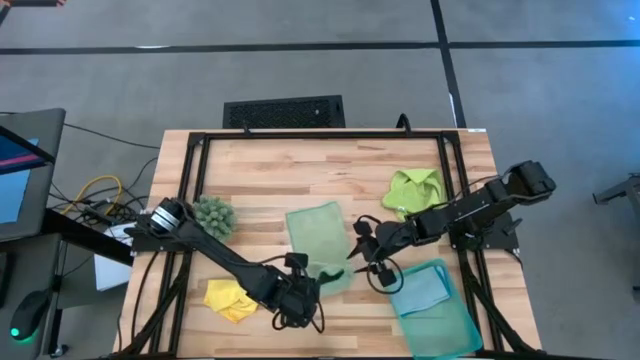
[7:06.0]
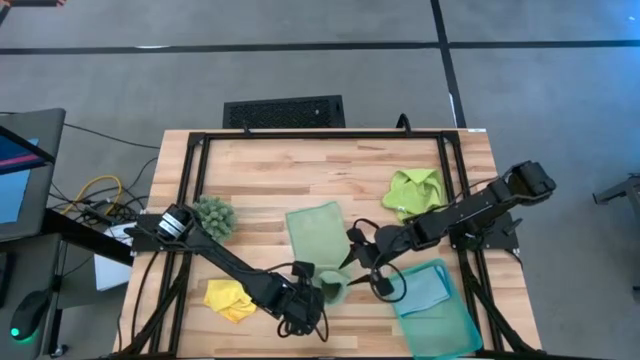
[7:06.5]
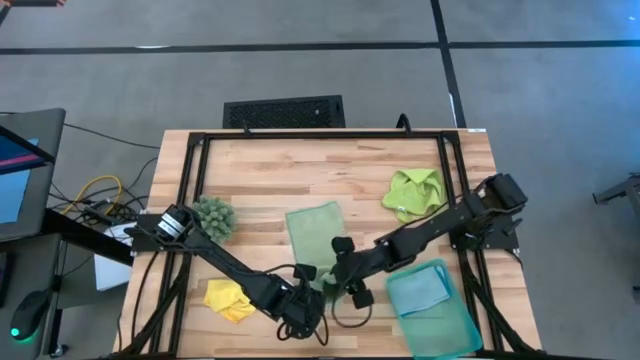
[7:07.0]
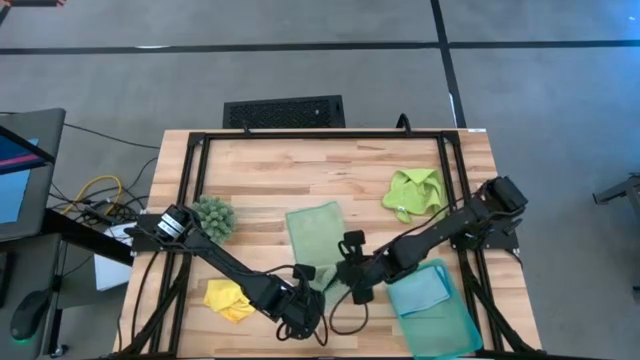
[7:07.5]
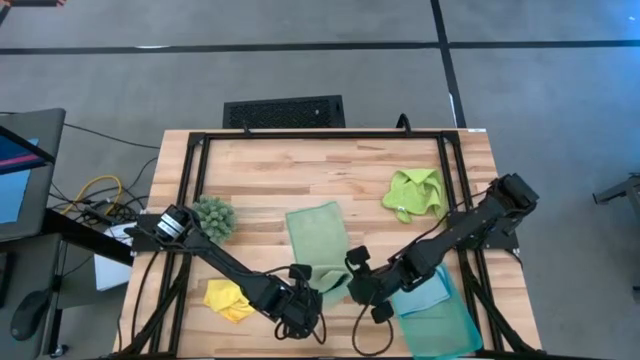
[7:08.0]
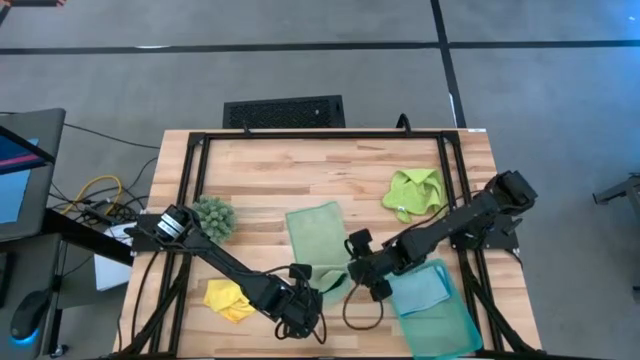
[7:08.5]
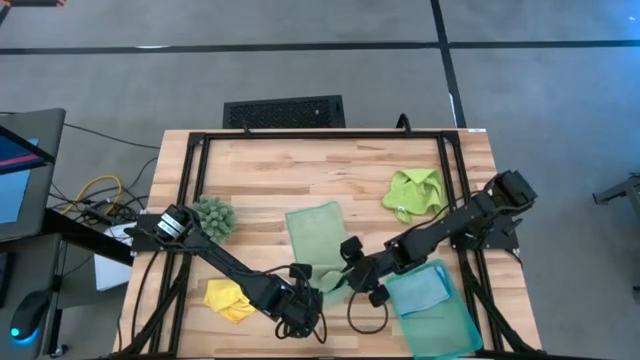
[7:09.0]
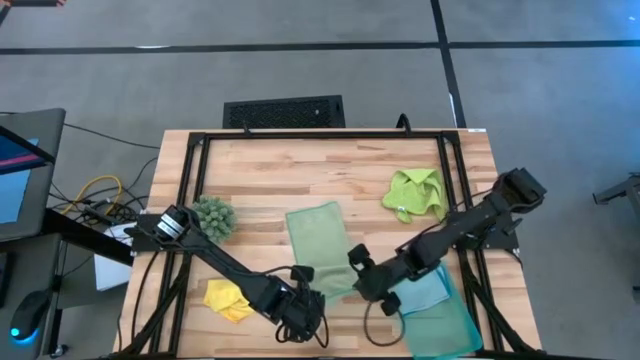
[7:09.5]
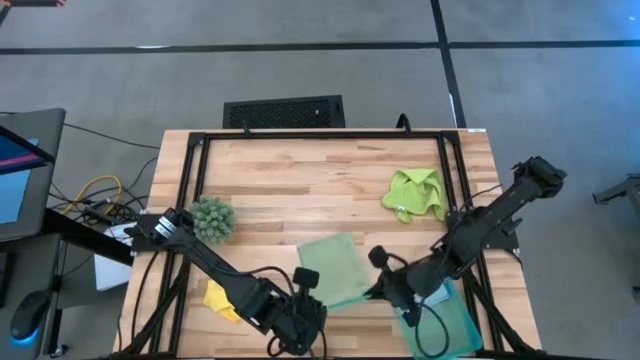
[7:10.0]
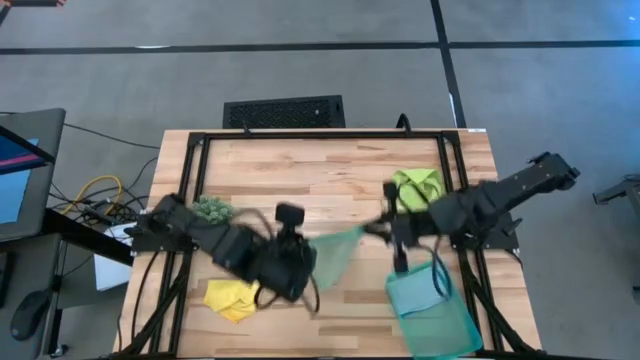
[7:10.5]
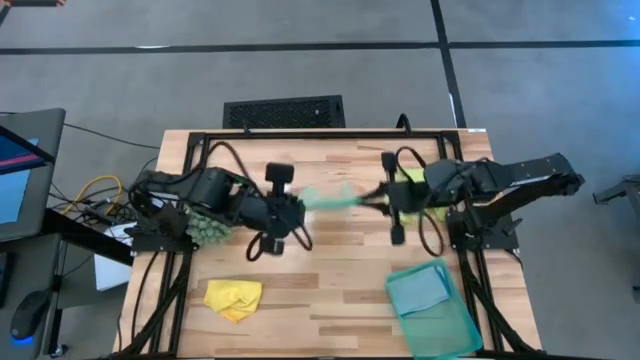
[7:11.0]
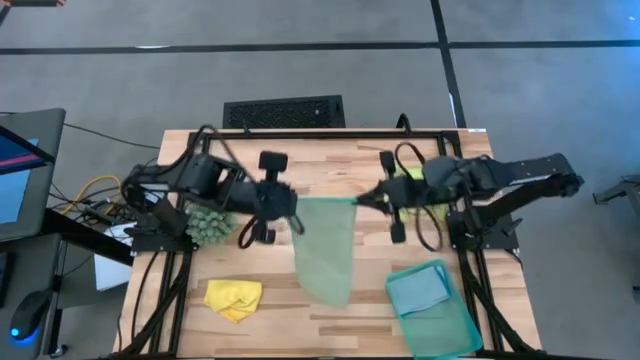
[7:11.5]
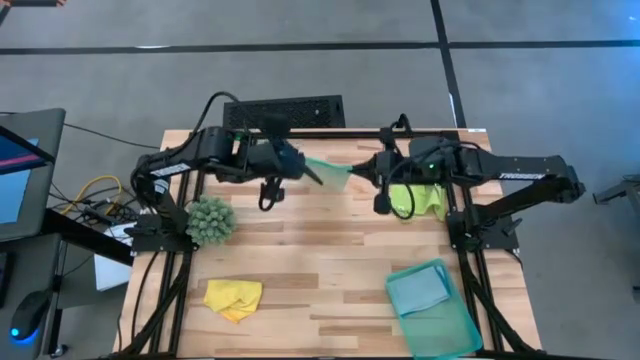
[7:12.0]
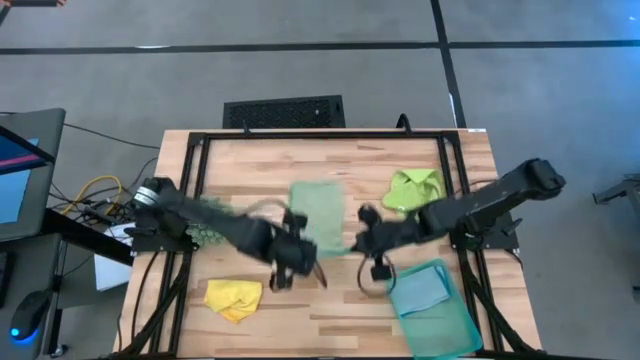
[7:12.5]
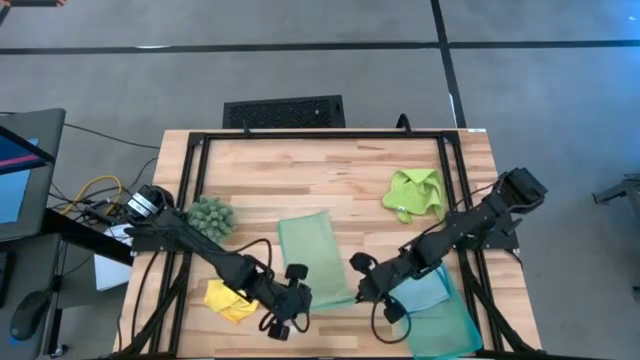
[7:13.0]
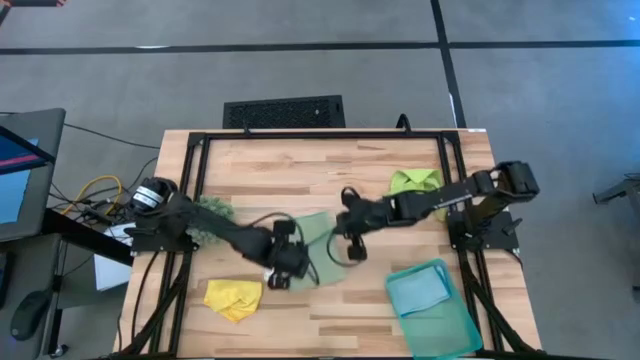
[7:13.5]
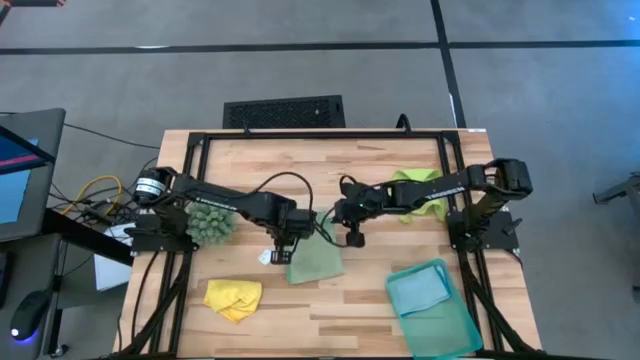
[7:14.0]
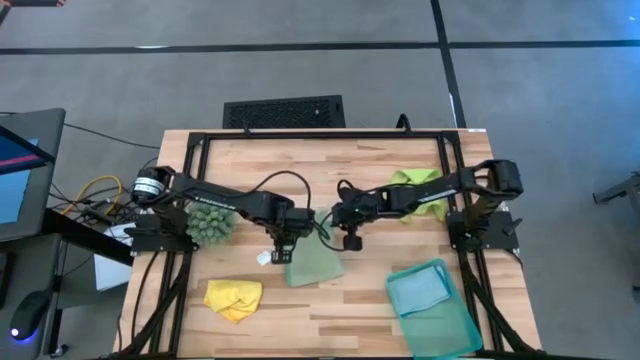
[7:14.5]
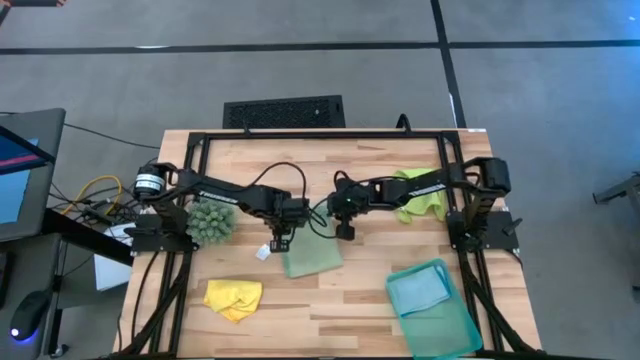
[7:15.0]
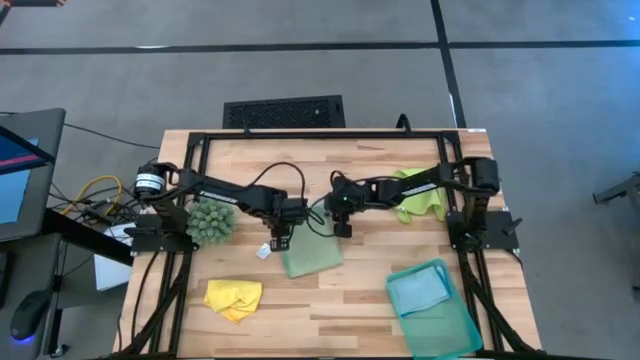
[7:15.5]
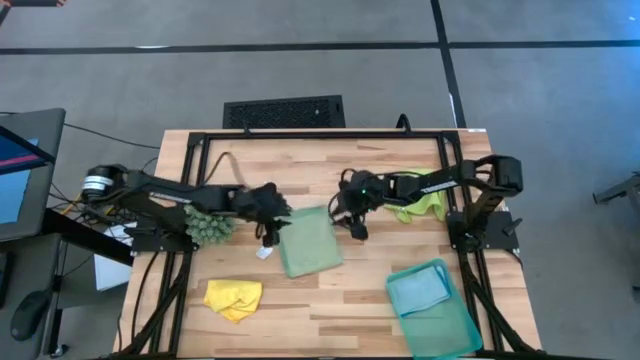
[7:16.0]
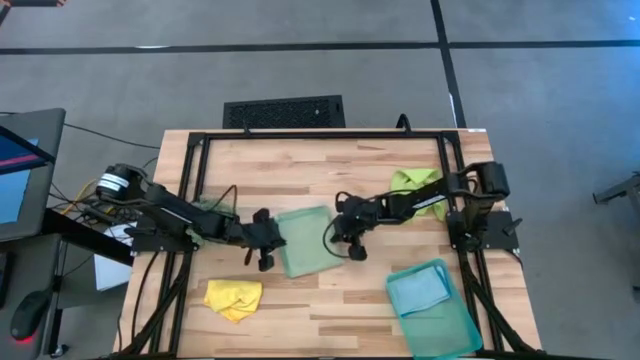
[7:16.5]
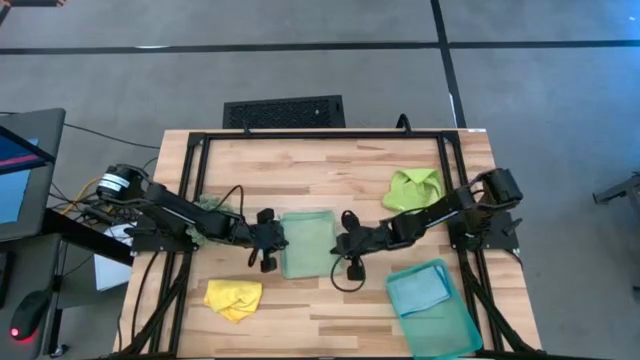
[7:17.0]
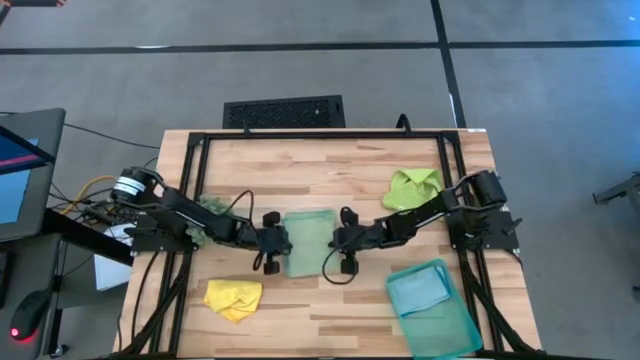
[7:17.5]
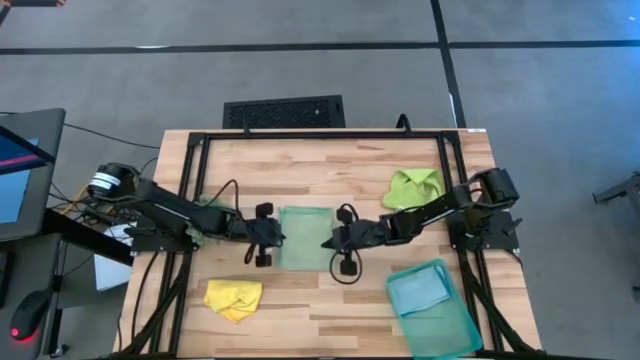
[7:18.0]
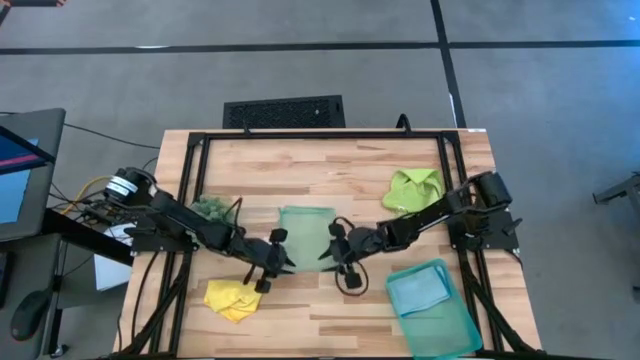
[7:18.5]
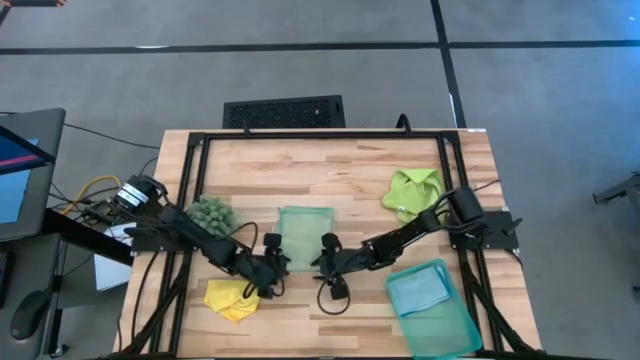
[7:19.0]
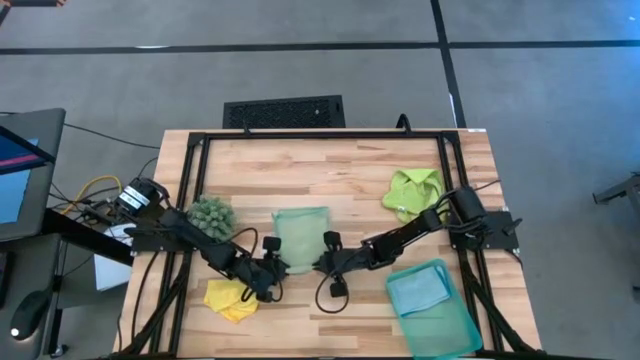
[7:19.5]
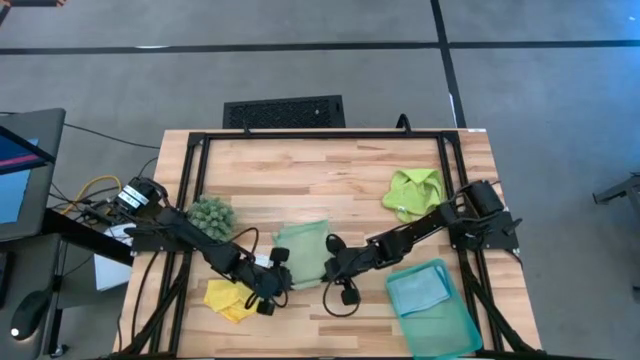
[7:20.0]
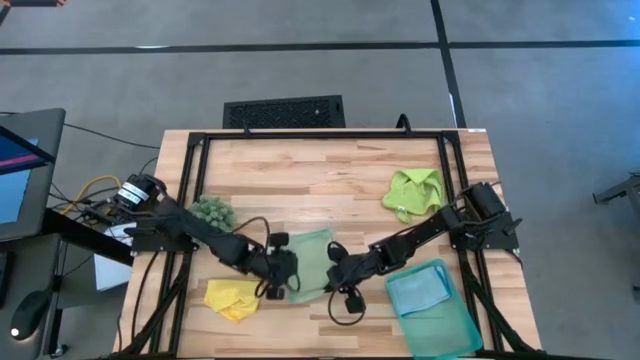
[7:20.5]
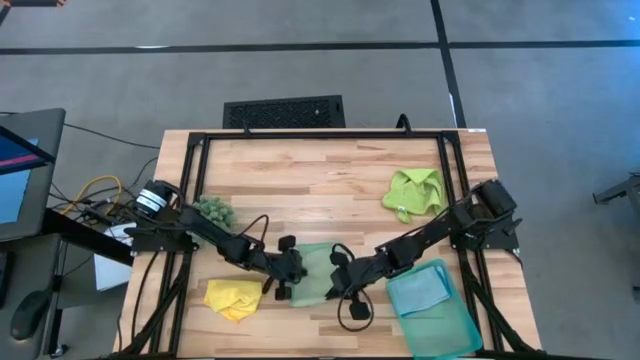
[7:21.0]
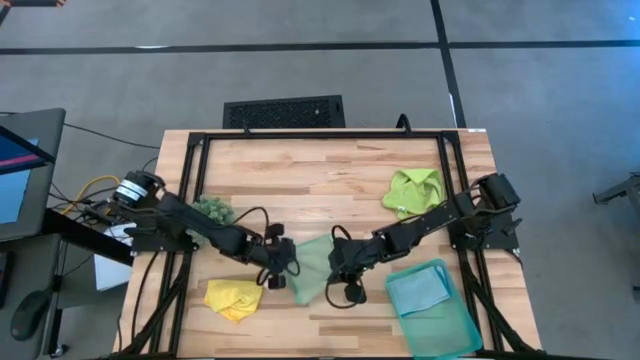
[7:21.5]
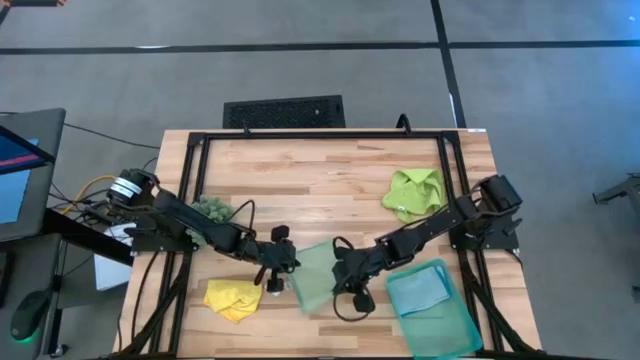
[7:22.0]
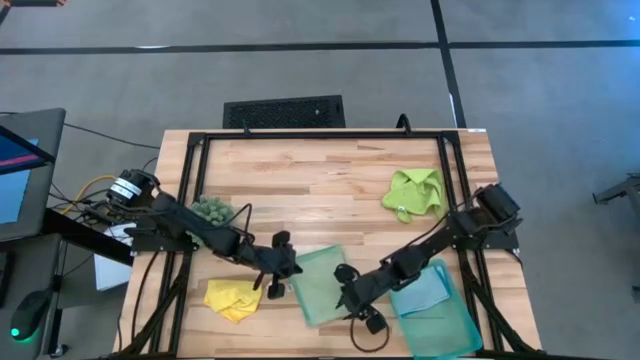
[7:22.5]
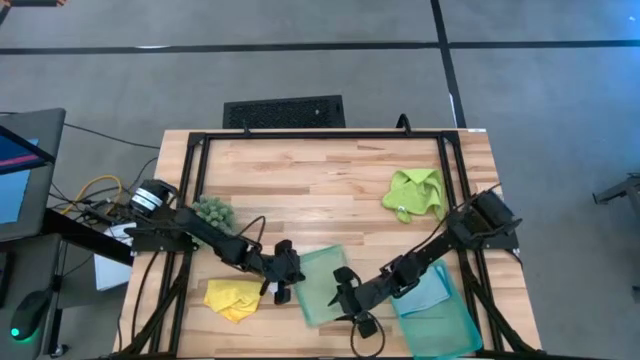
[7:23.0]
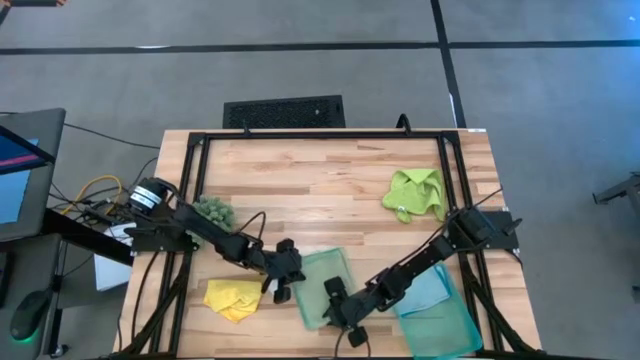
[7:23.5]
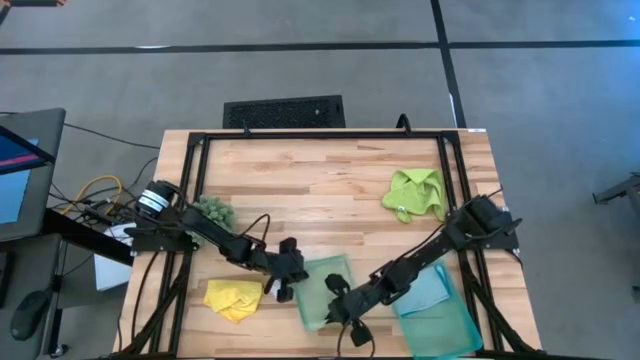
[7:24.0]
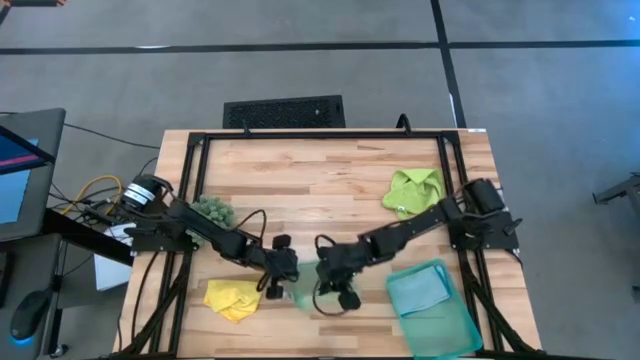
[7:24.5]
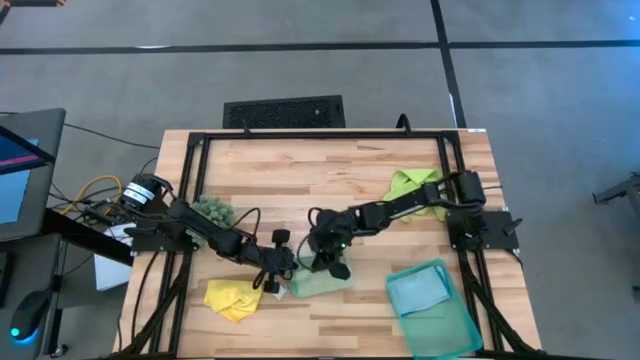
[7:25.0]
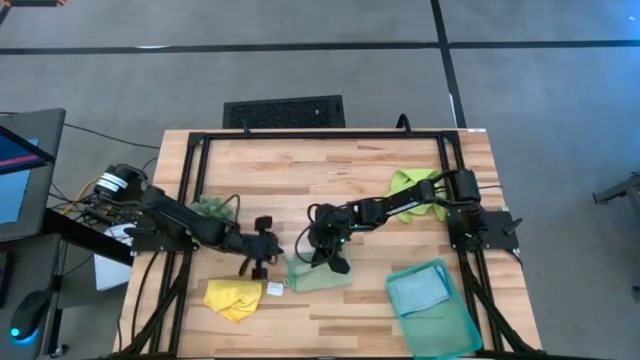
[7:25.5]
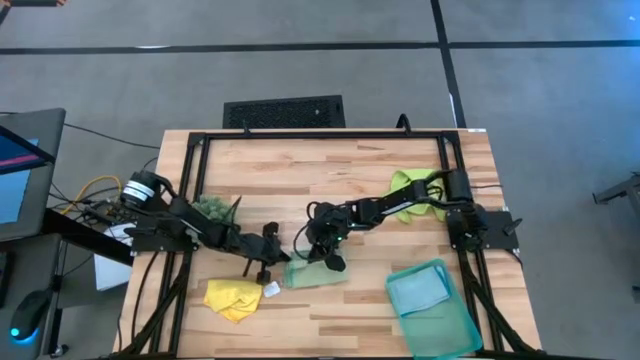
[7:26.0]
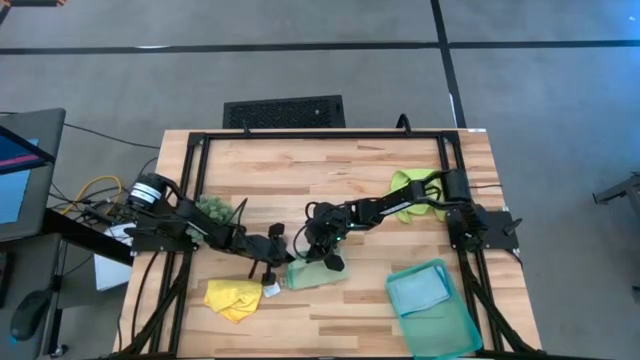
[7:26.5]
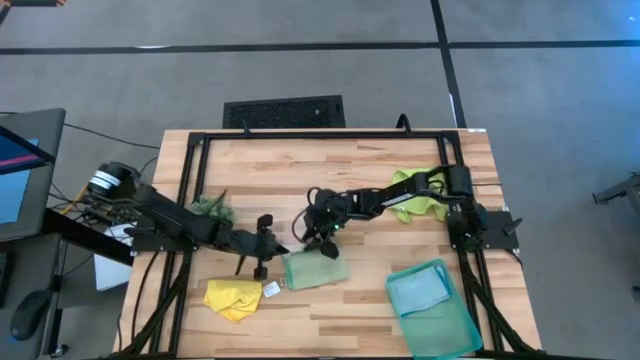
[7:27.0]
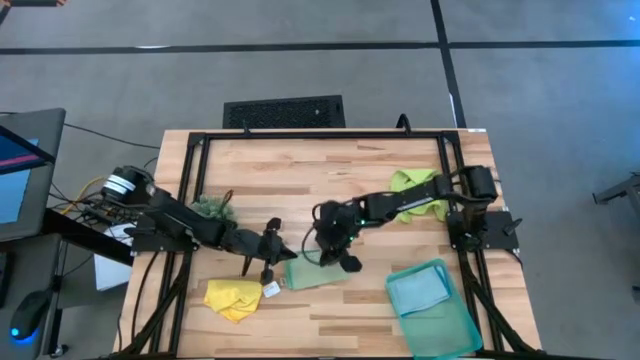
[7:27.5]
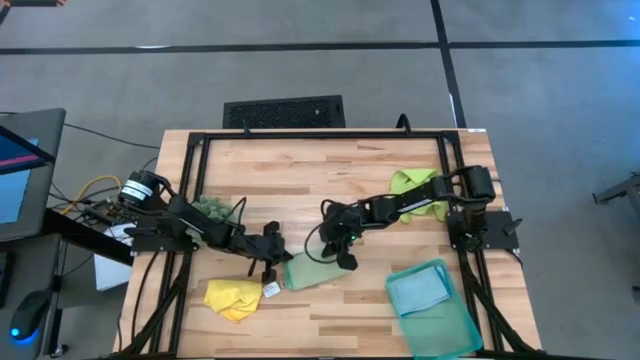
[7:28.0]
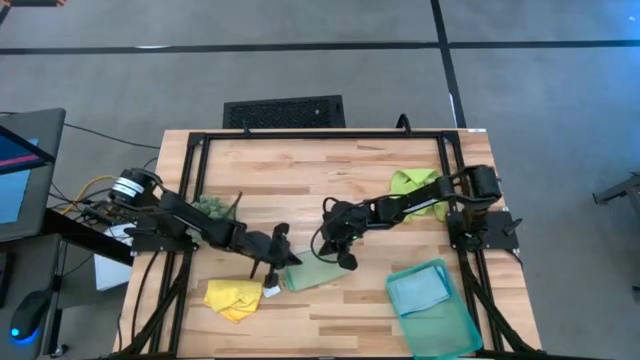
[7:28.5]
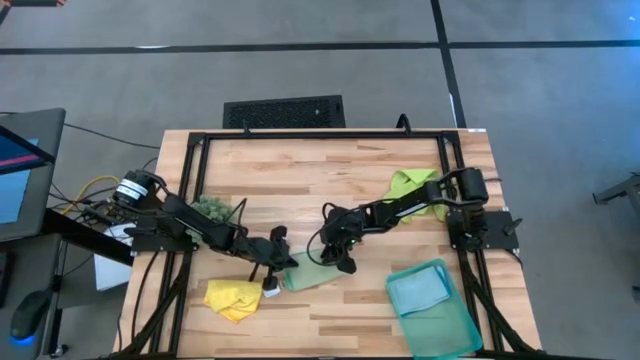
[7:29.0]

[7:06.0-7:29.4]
Task: Fold microfiber towels
Fold the green microfiber cloth
